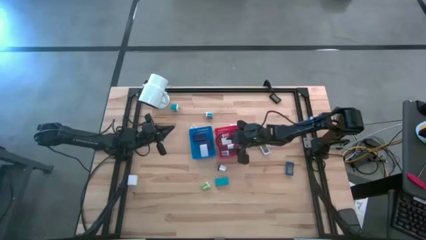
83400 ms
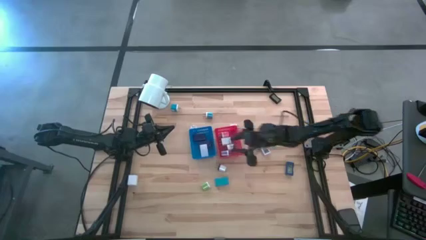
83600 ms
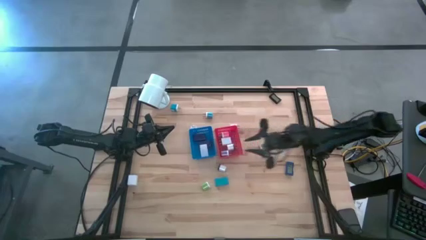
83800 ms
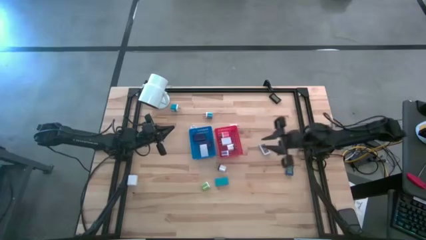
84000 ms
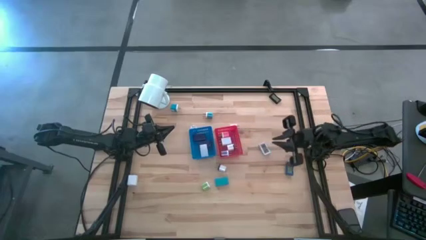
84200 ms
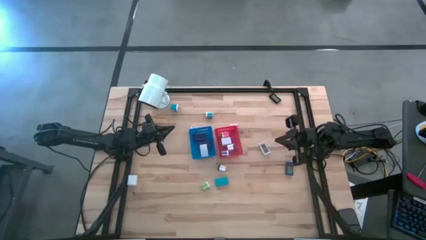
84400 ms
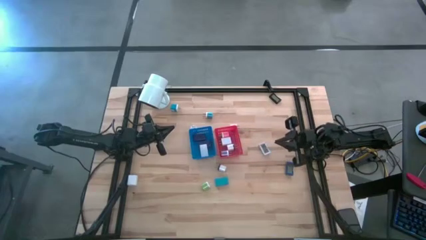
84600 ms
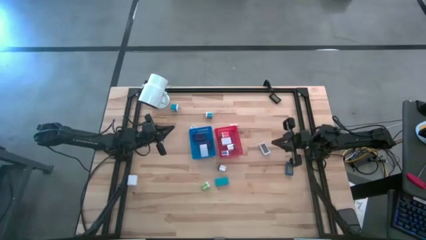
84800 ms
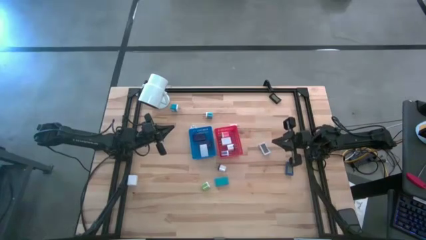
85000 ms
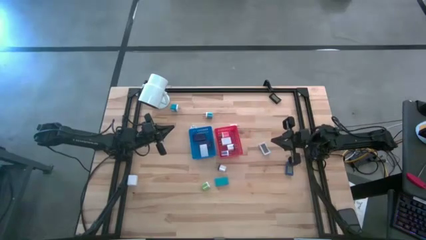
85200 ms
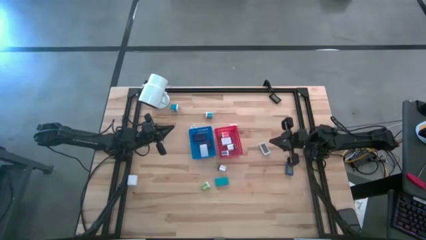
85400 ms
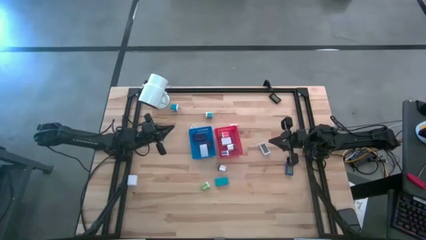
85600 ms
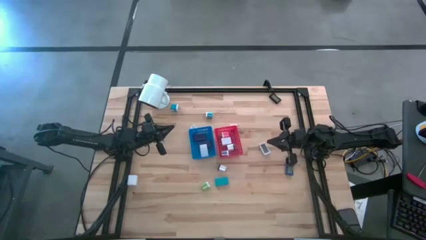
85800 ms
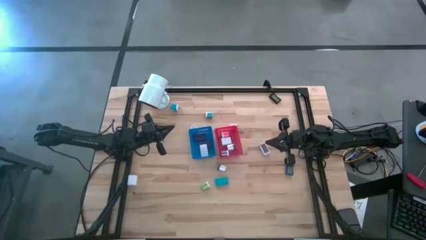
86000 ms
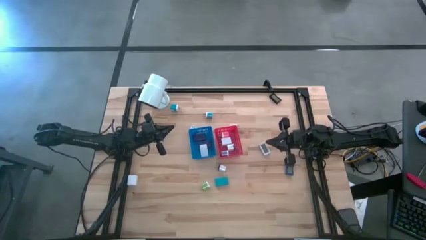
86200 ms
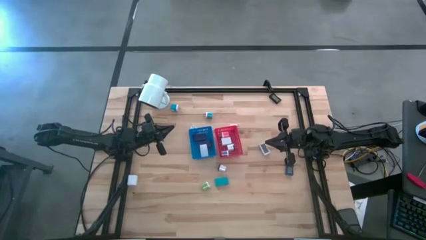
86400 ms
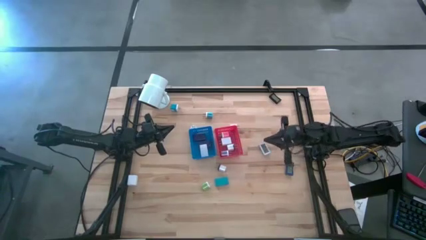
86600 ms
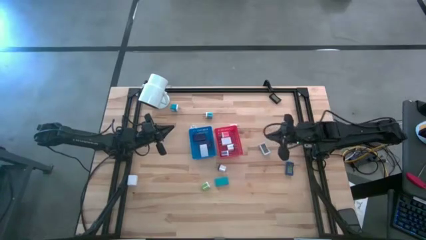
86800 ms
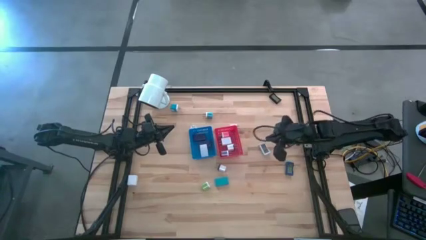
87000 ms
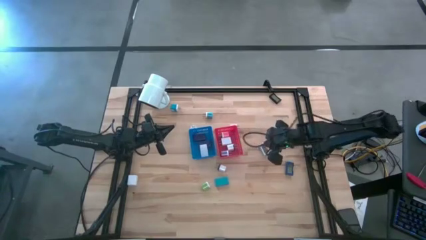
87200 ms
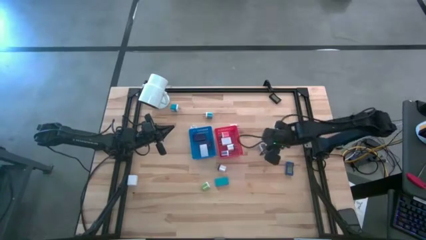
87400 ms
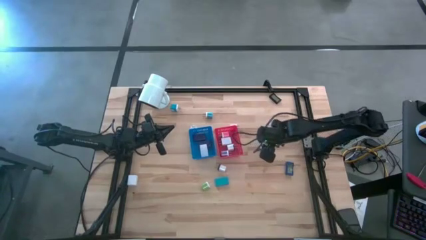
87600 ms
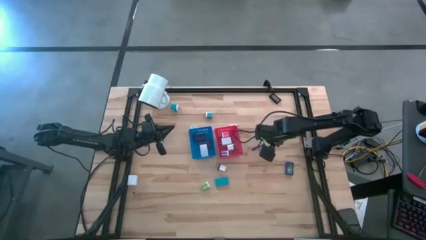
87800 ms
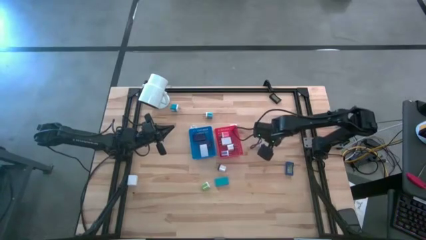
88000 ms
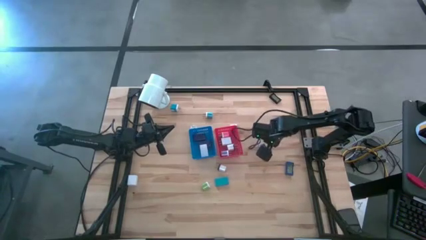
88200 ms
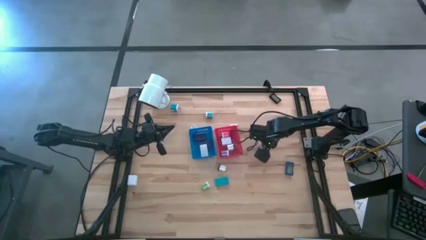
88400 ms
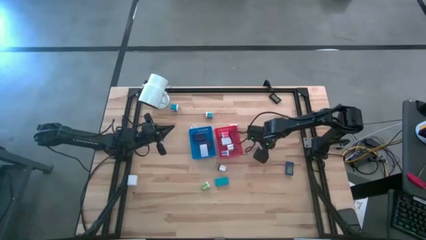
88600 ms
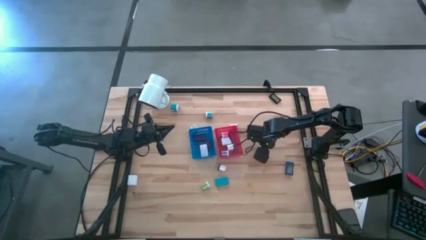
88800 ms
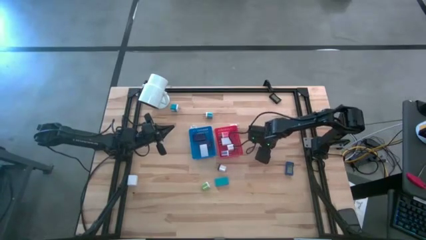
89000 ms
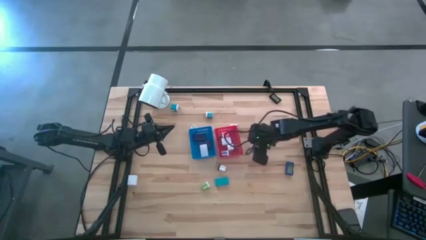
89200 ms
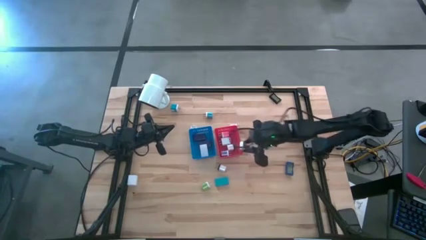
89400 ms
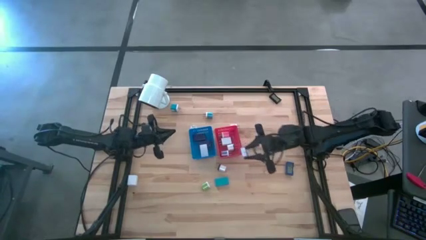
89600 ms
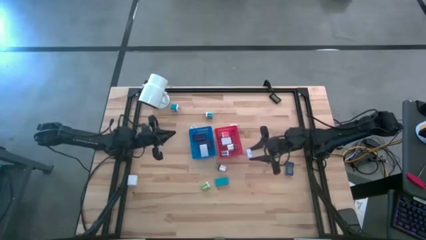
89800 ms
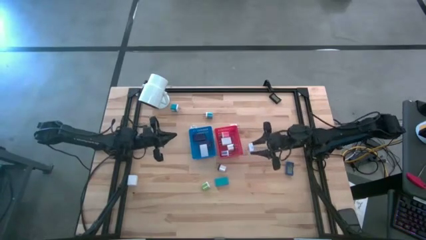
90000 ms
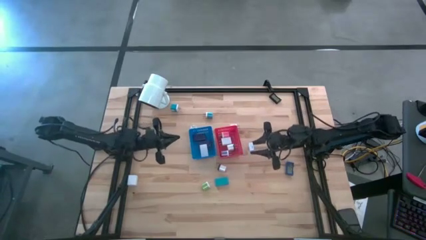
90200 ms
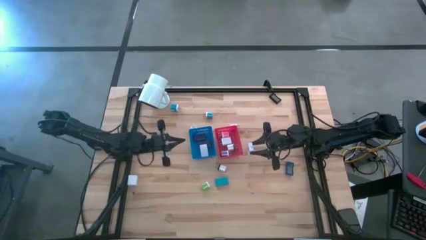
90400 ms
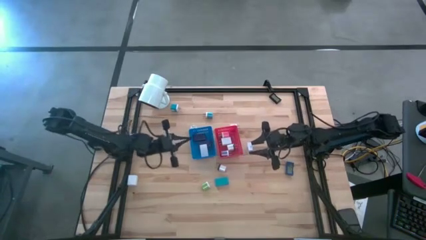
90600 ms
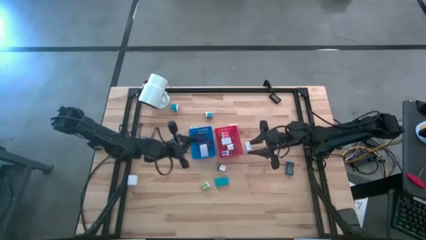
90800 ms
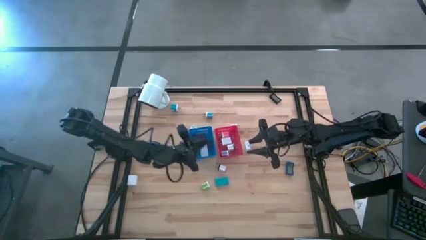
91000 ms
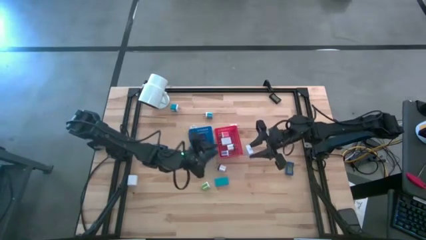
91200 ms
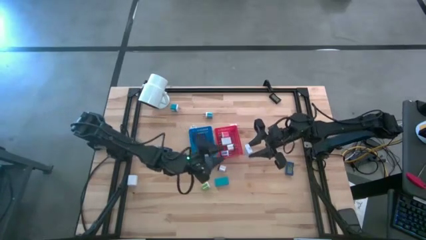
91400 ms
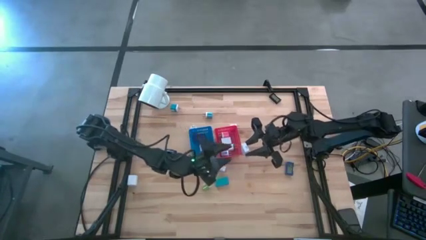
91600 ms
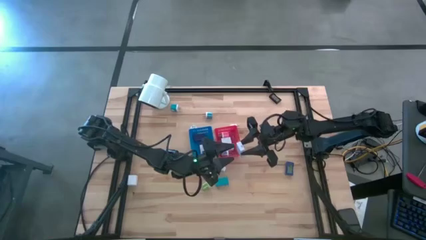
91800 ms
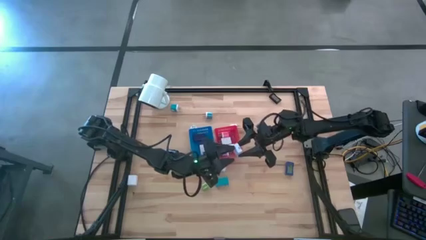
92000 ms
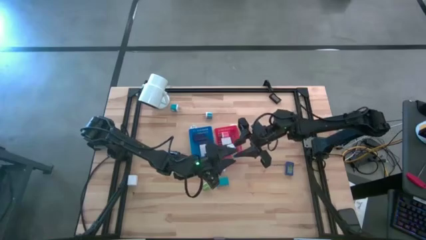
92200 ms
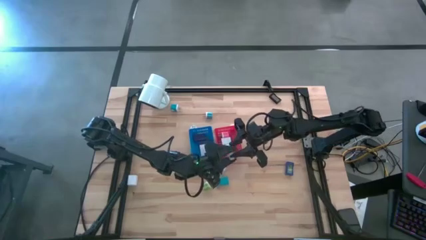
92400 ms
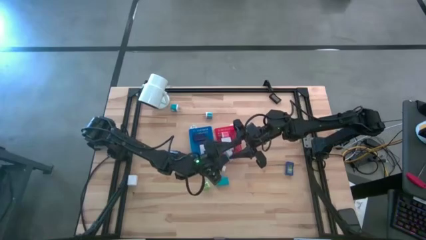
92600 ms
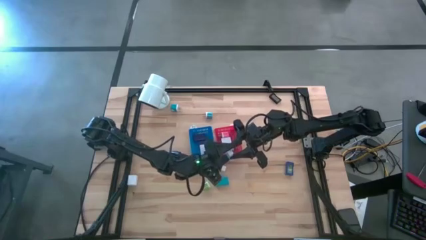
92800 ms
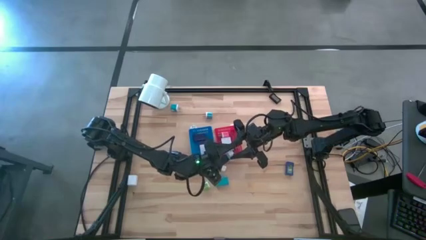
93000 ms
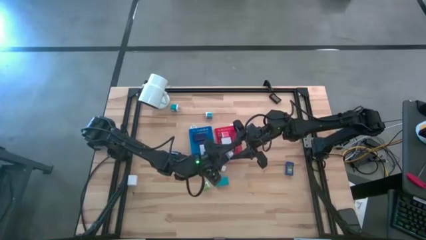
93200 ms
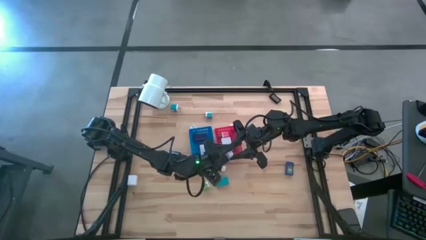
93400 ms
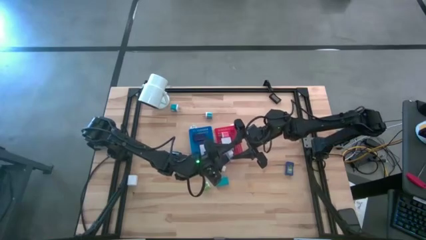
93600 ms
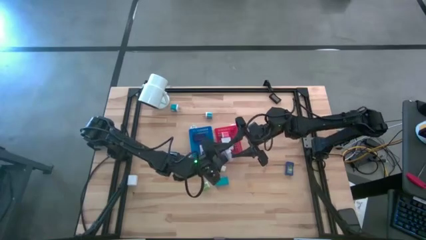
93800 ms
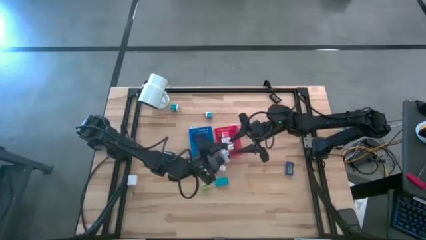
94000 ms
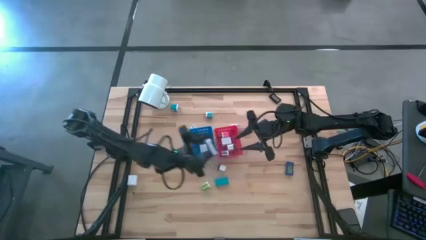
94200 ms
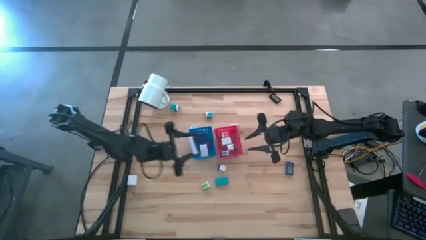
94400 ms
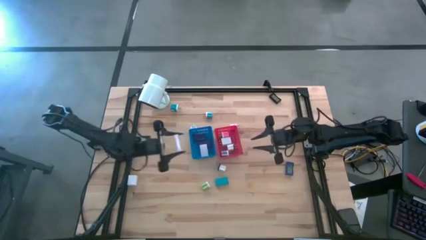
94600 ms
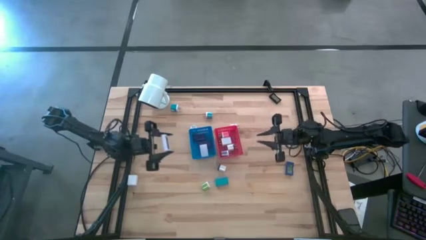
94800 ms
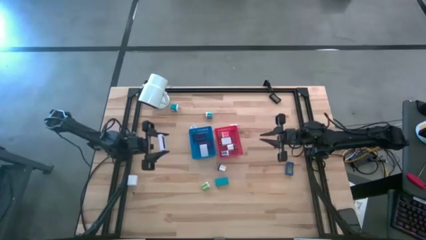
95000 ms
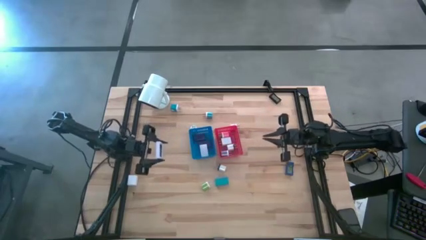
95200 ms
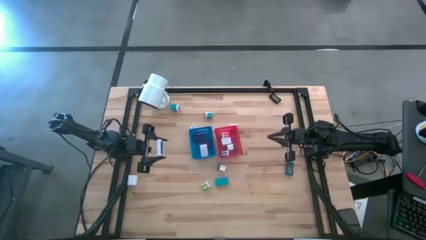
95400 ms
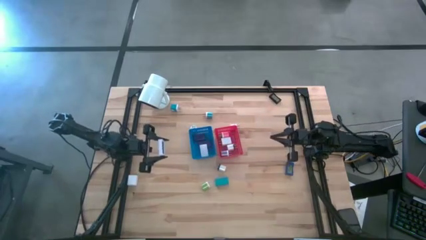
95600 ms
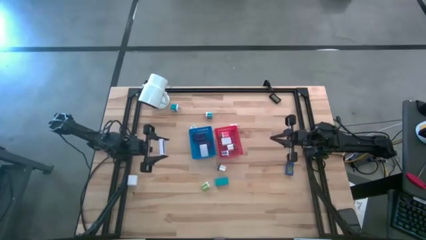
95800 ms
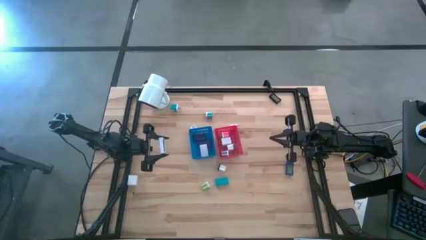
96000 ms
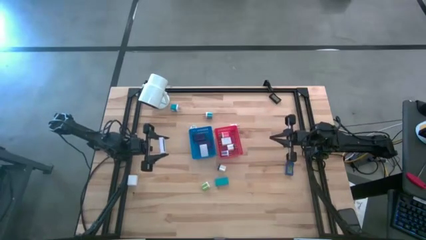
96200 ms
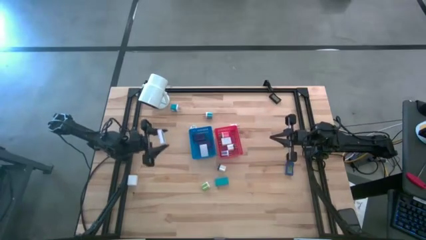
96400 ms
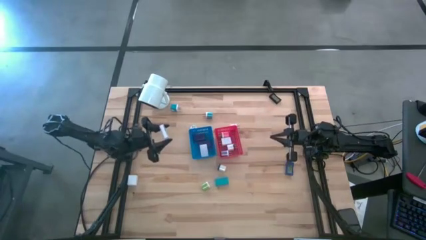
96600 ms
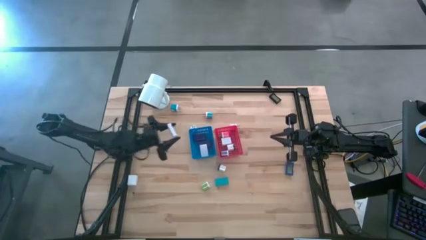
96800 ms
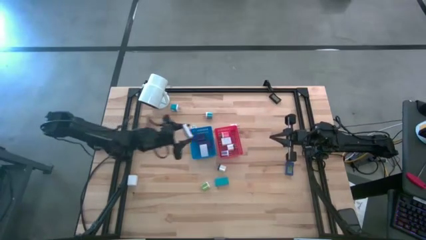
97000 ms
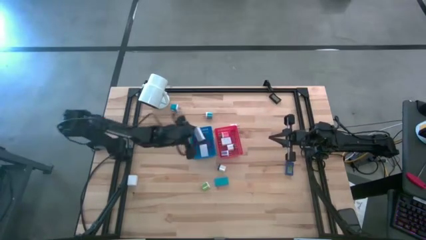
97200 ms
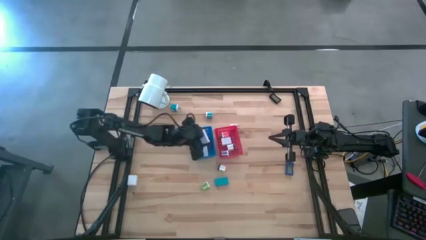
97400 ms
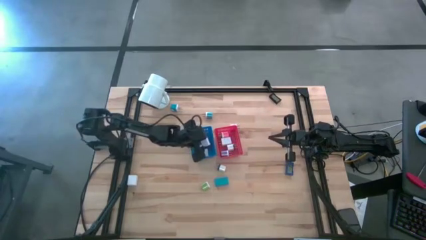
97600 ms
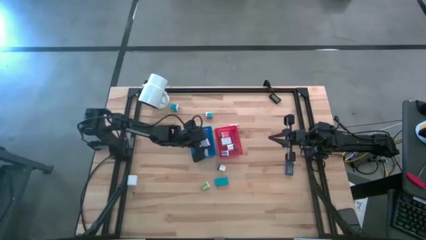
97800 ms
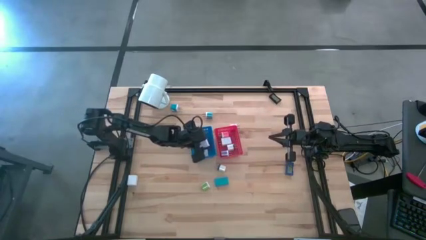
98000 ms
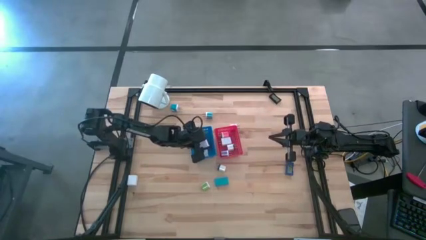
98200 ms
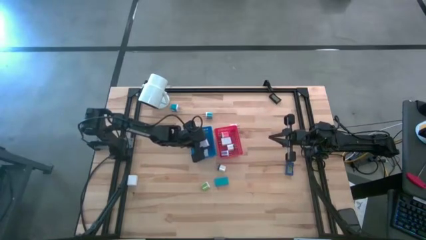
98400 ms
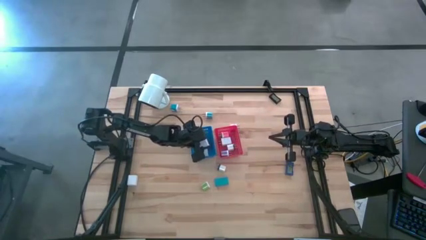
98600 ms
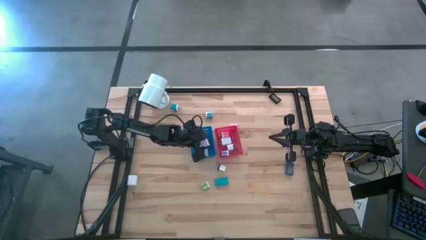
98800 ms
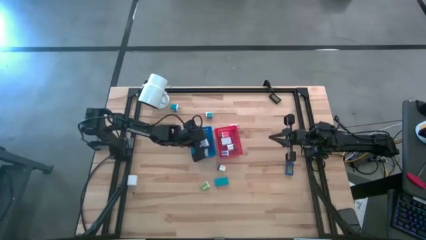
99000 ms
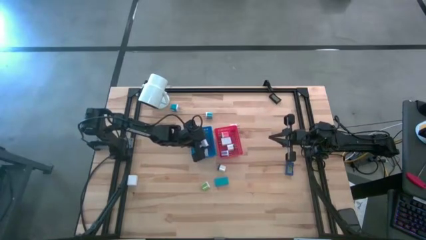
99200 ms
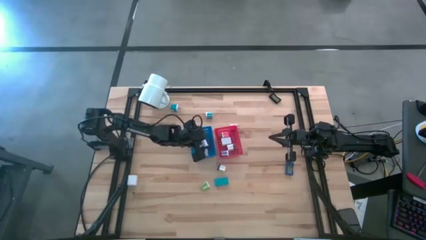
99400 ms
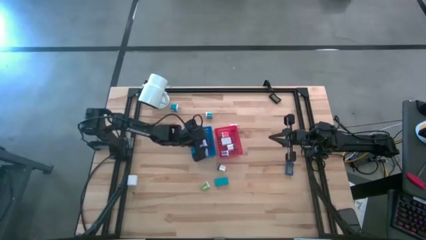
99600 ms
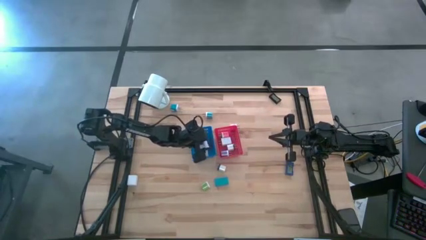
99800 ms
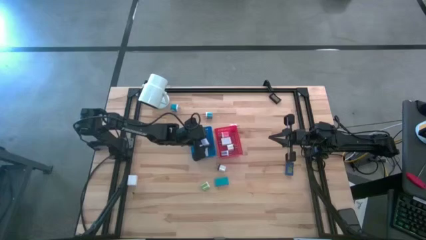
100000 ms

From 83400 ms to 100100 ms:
Task: Pick & Place Office items
Put the white digital clock into the blue bin
